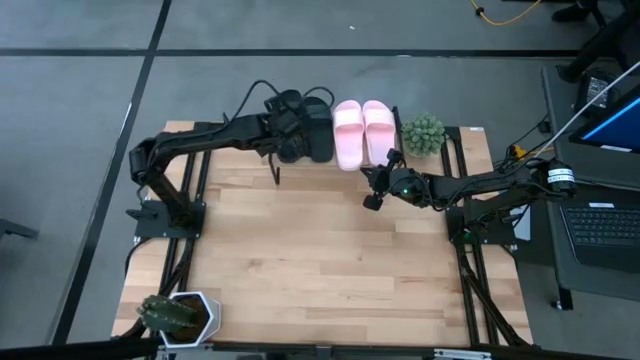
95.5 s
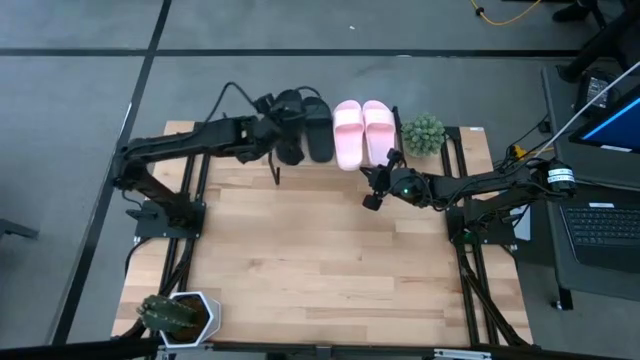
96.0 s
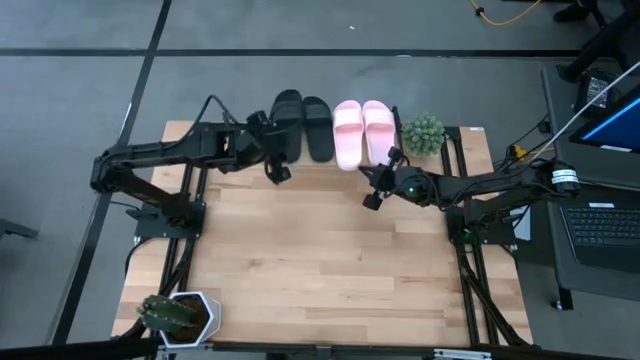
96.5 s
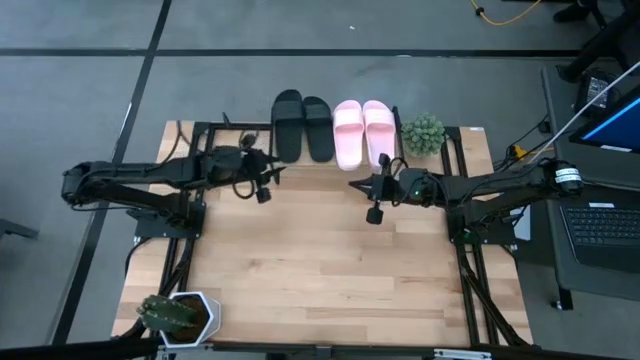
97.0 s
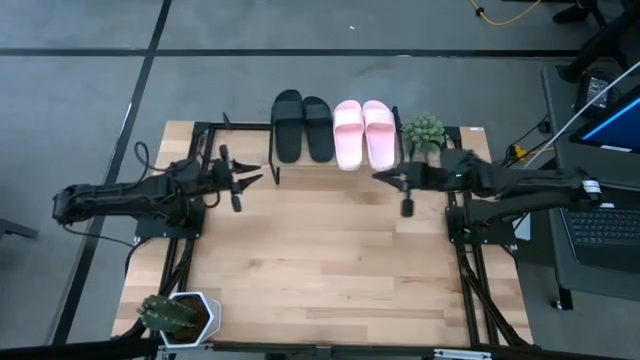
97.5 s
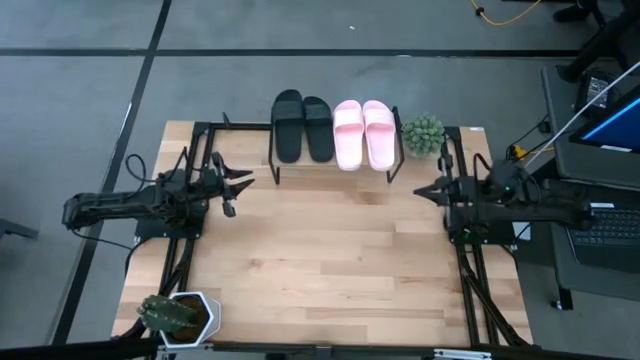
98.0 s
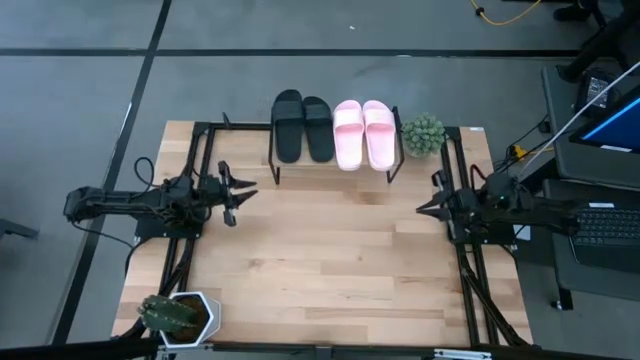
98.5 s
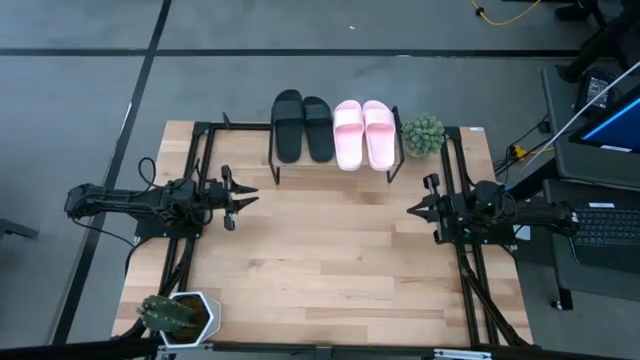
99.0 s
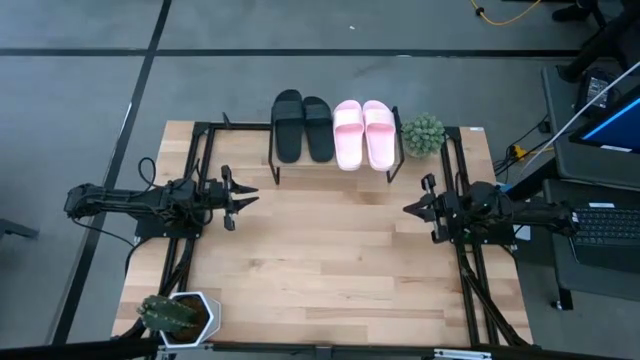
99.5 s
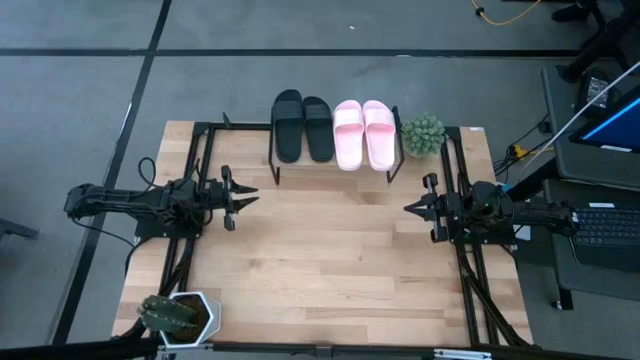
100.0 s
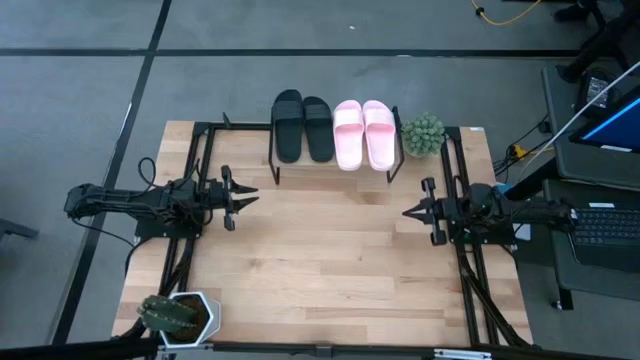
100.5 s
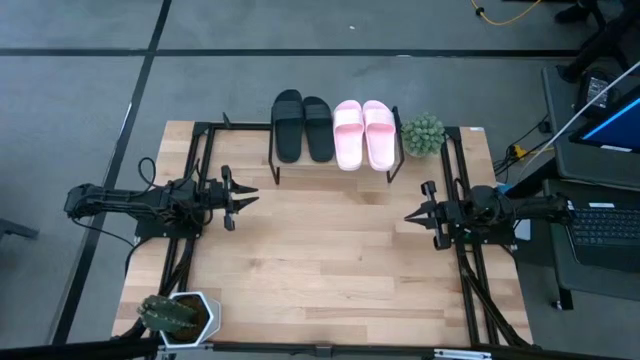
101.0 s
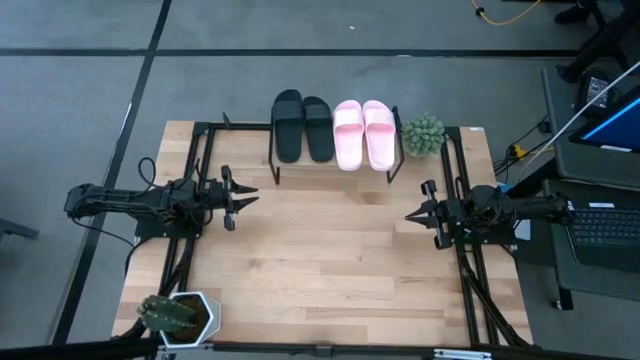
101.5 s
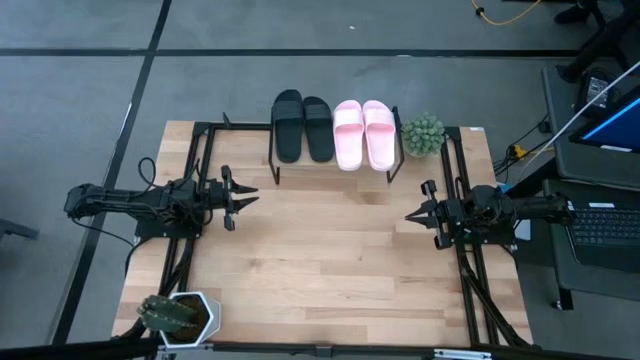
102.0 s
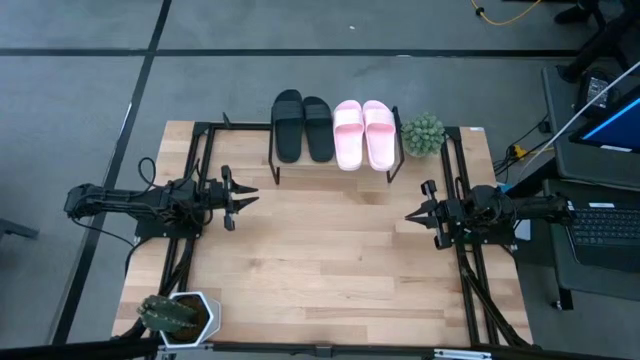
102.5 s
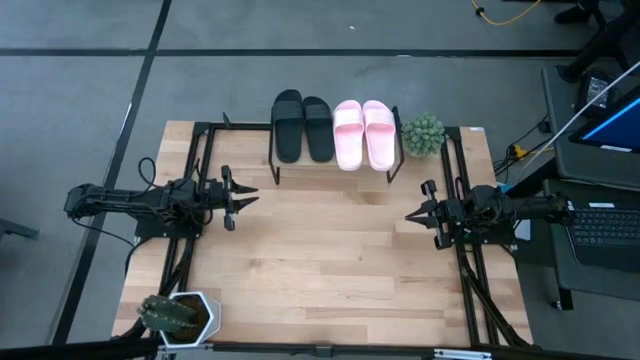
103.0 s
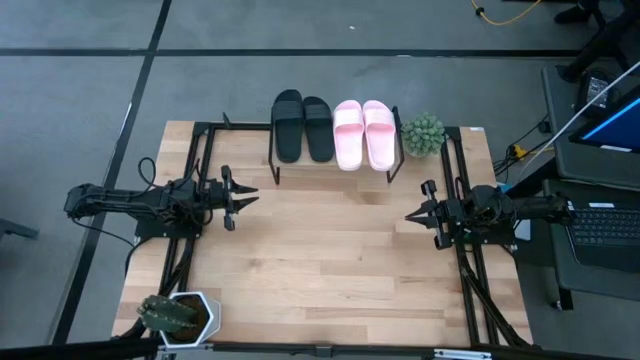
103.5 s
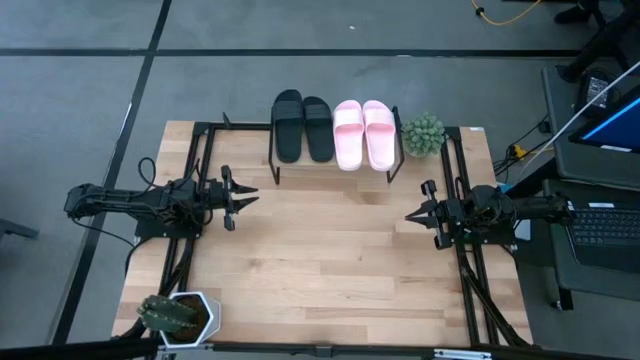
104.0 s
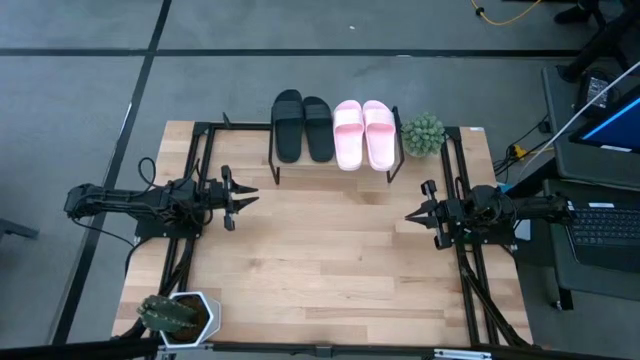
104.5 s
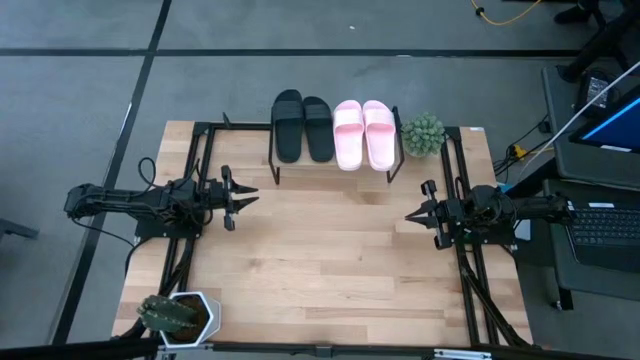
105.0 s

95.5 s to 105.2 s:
Task: Pick and place slides into the shelf
Return to Home Position
